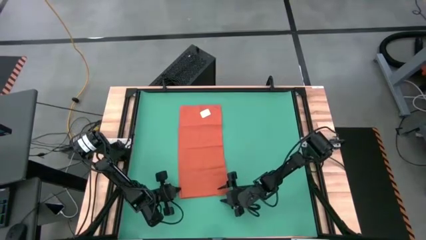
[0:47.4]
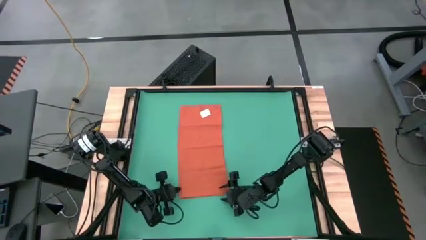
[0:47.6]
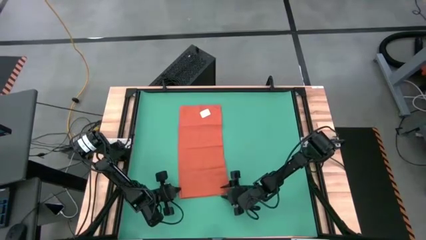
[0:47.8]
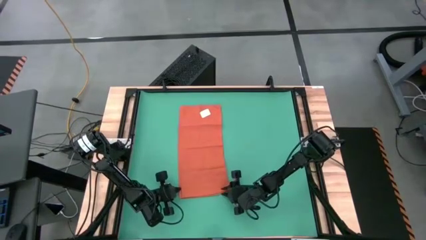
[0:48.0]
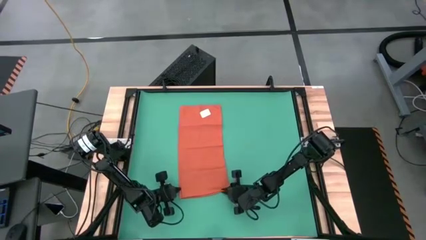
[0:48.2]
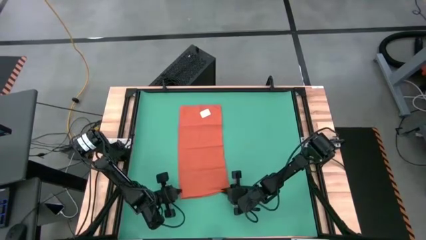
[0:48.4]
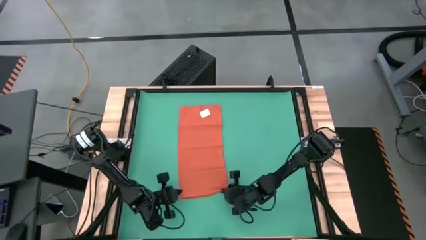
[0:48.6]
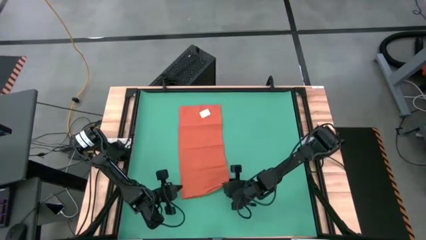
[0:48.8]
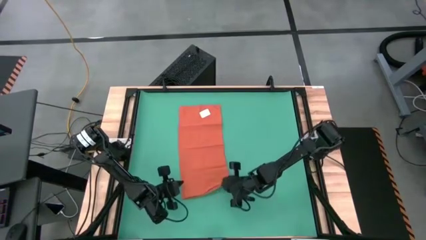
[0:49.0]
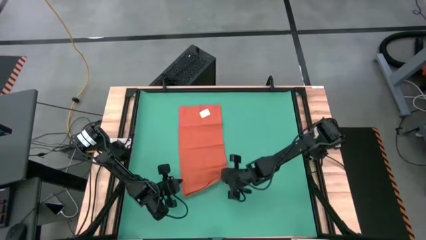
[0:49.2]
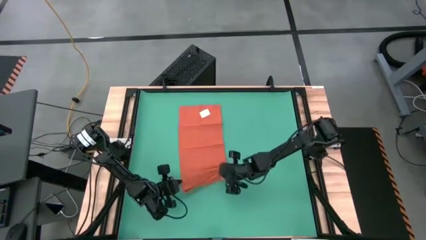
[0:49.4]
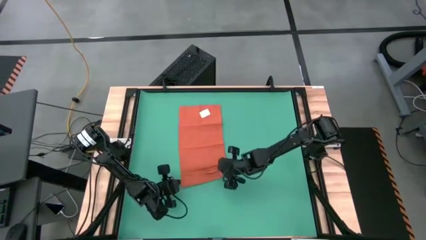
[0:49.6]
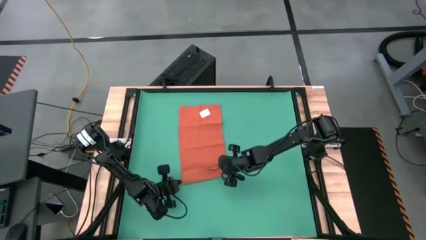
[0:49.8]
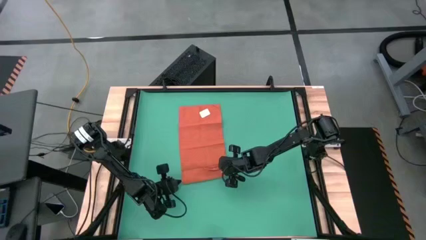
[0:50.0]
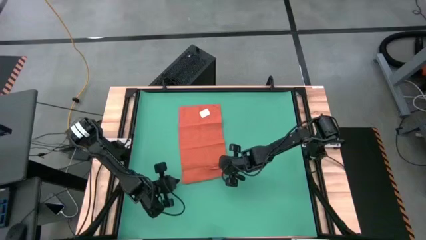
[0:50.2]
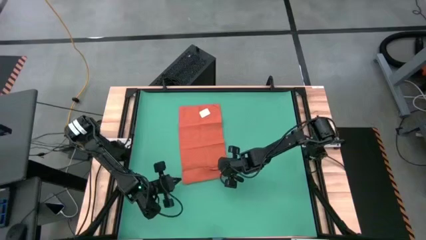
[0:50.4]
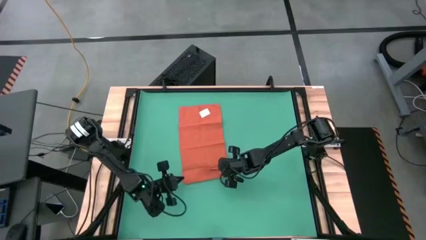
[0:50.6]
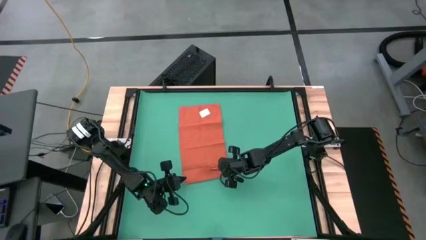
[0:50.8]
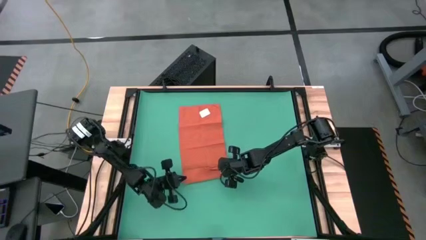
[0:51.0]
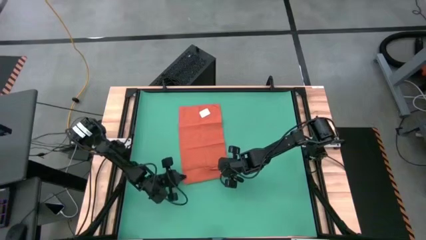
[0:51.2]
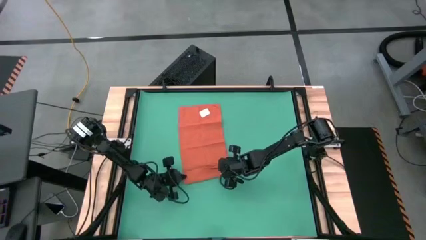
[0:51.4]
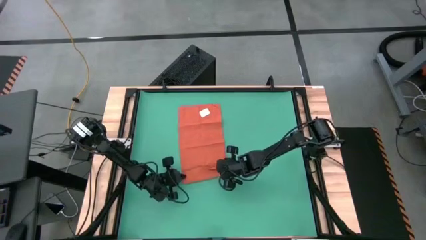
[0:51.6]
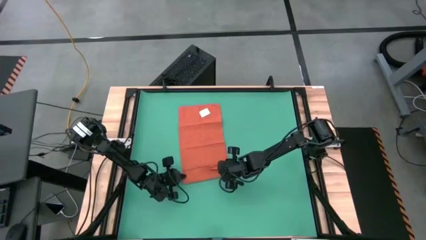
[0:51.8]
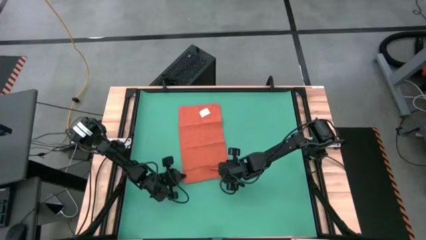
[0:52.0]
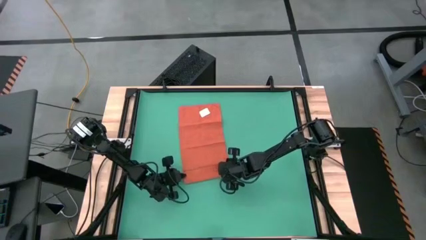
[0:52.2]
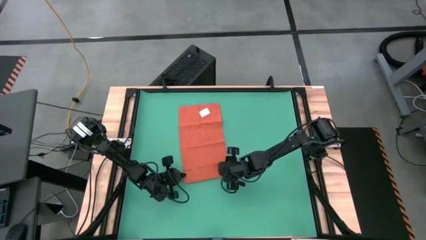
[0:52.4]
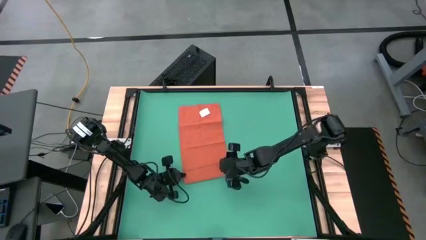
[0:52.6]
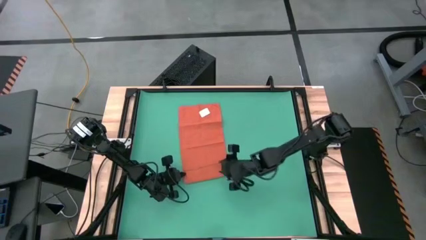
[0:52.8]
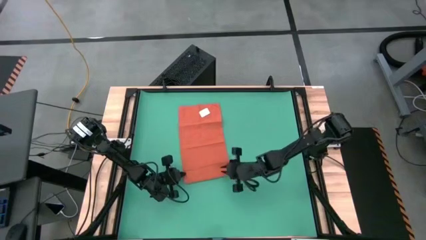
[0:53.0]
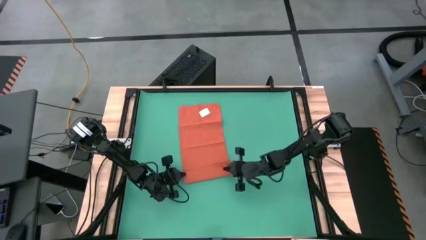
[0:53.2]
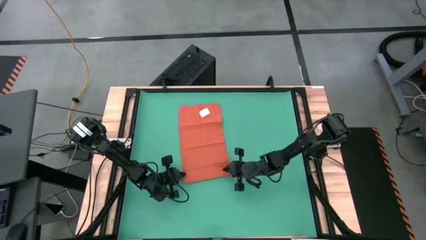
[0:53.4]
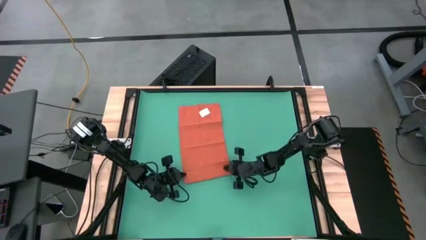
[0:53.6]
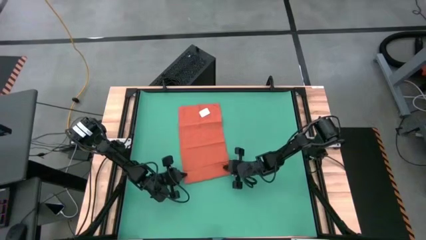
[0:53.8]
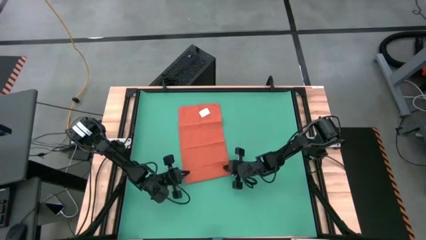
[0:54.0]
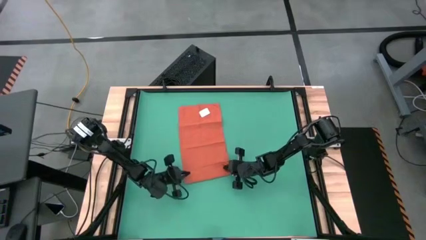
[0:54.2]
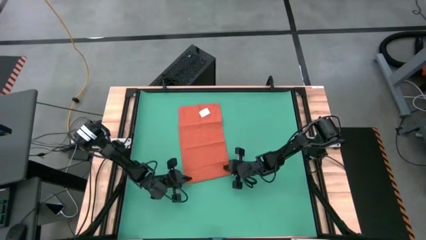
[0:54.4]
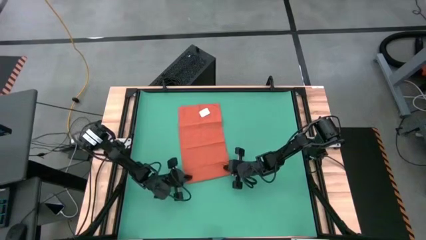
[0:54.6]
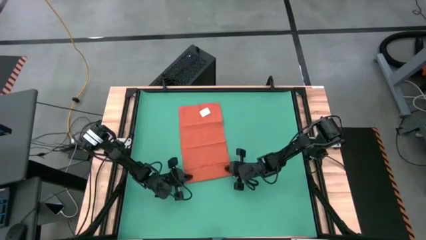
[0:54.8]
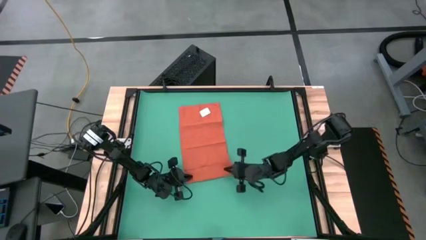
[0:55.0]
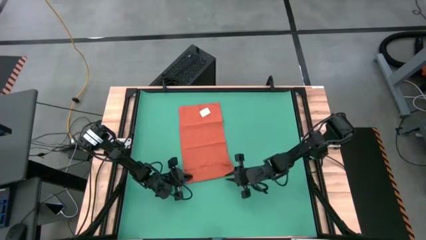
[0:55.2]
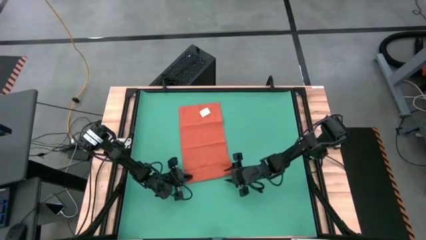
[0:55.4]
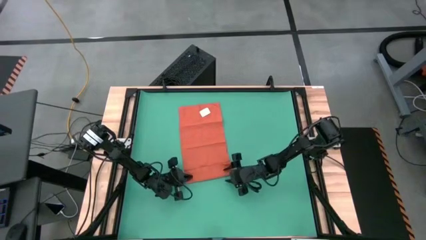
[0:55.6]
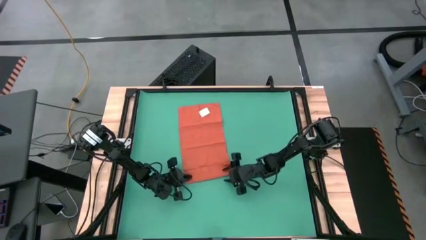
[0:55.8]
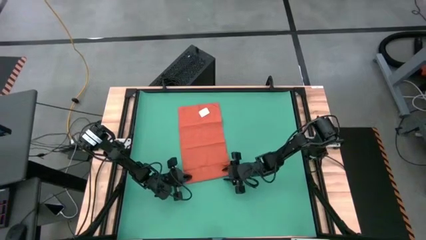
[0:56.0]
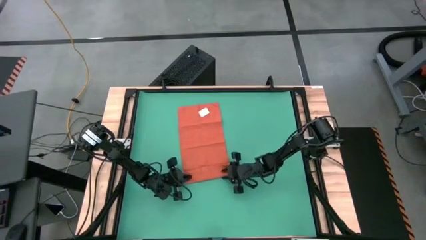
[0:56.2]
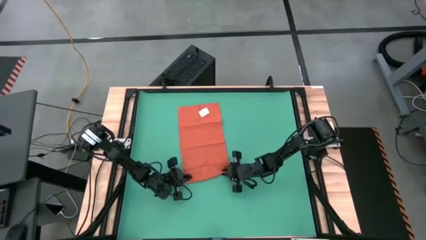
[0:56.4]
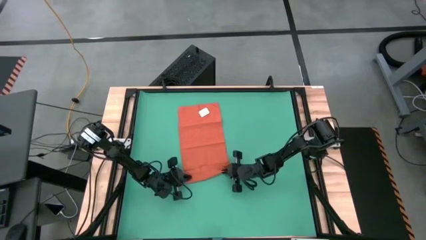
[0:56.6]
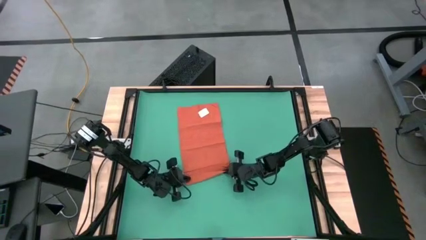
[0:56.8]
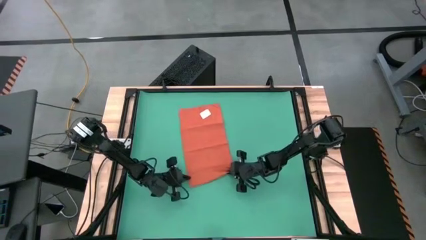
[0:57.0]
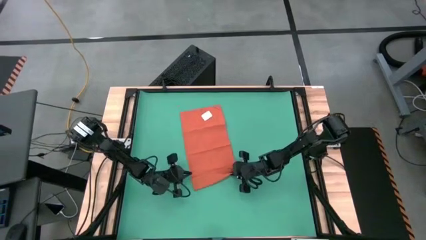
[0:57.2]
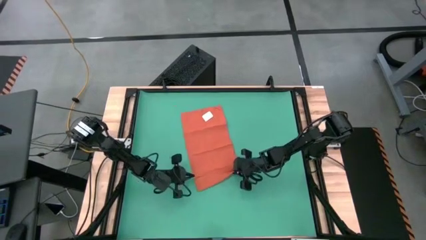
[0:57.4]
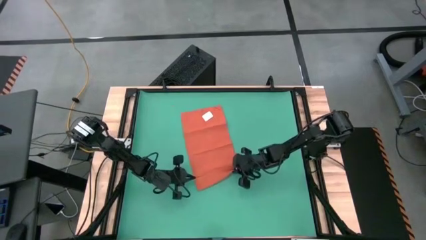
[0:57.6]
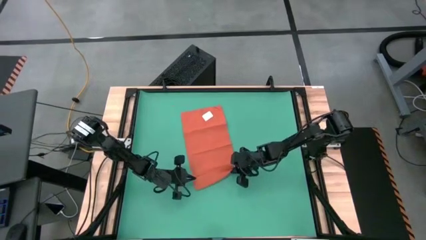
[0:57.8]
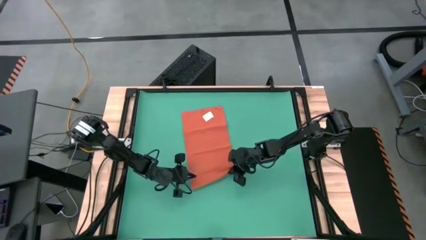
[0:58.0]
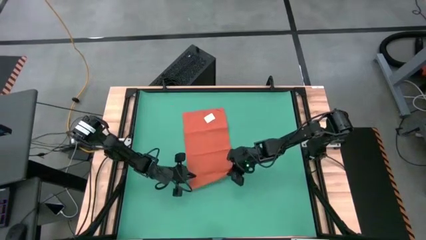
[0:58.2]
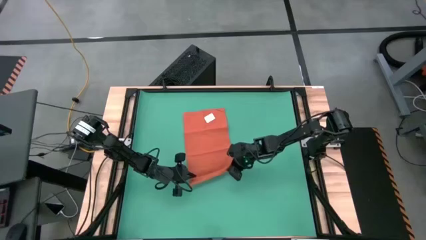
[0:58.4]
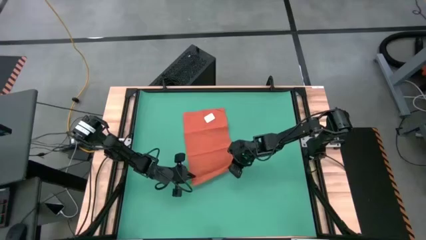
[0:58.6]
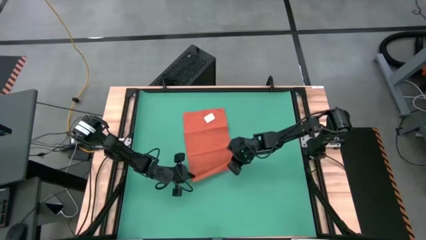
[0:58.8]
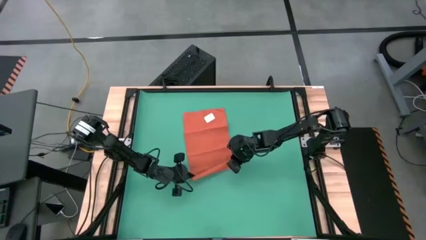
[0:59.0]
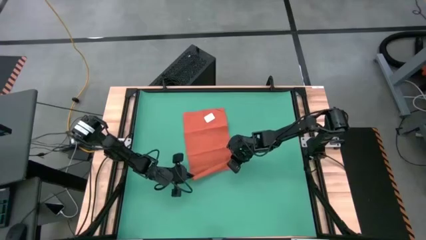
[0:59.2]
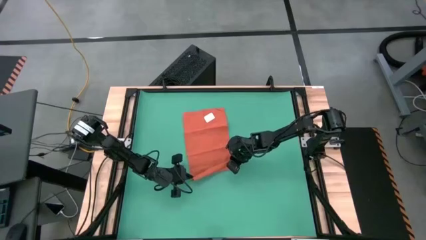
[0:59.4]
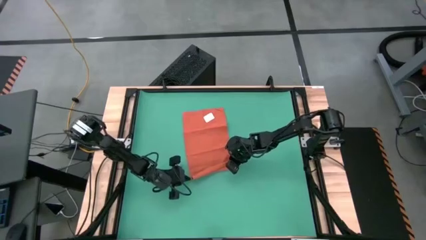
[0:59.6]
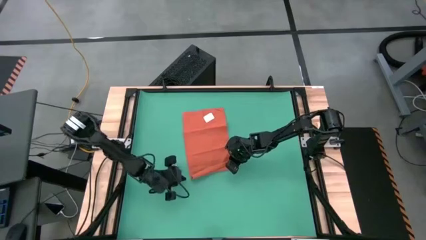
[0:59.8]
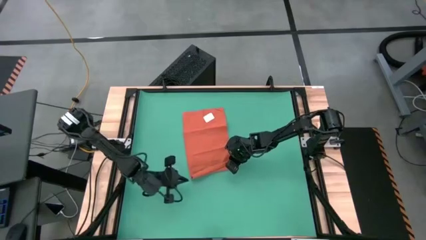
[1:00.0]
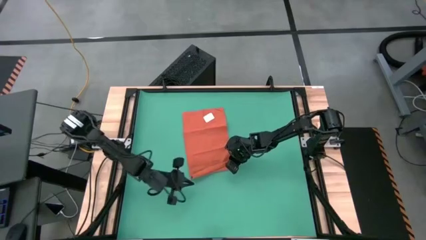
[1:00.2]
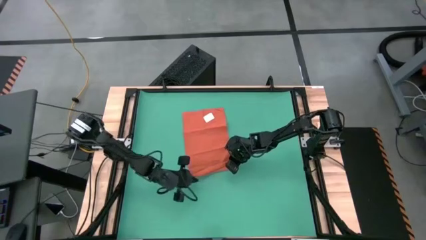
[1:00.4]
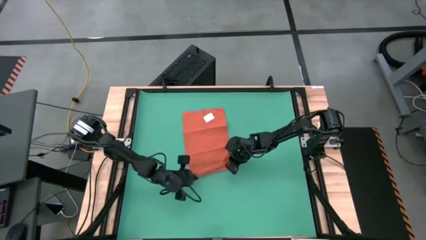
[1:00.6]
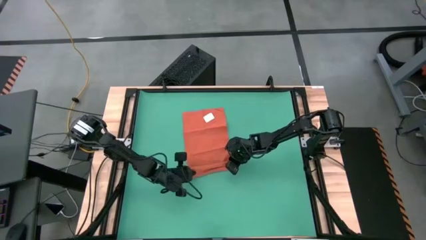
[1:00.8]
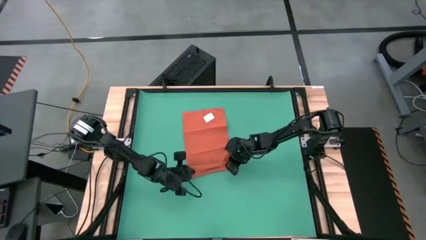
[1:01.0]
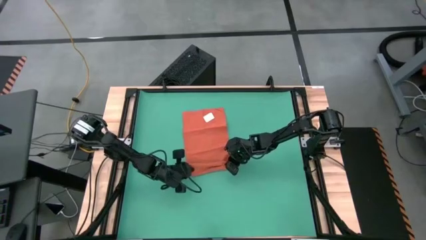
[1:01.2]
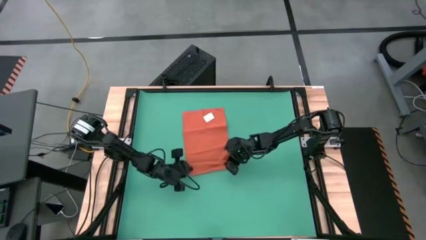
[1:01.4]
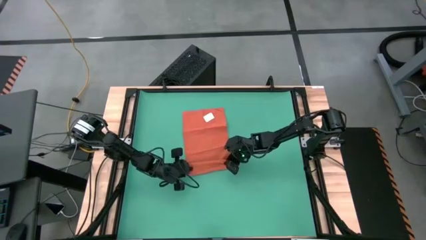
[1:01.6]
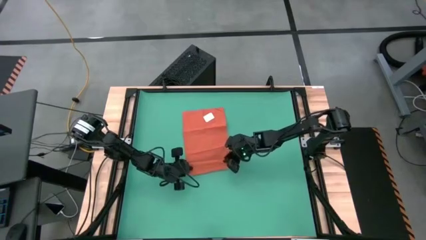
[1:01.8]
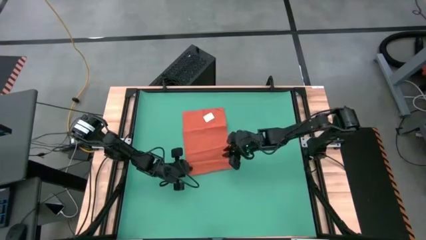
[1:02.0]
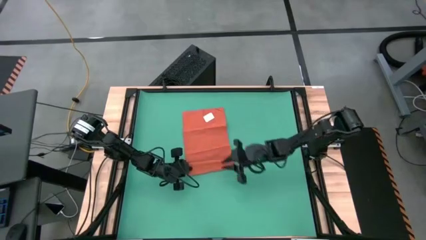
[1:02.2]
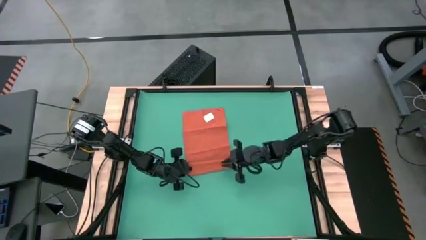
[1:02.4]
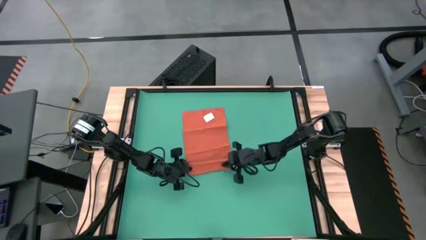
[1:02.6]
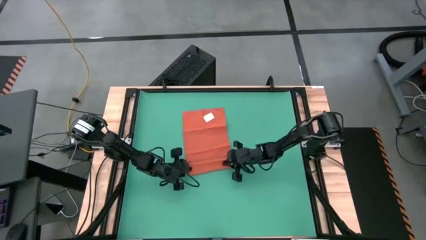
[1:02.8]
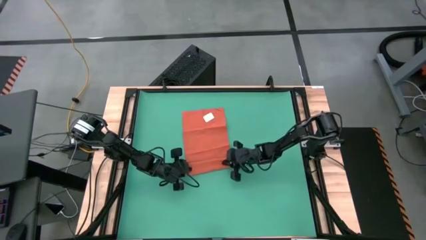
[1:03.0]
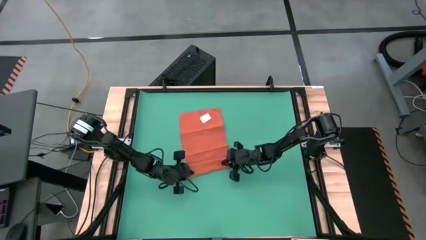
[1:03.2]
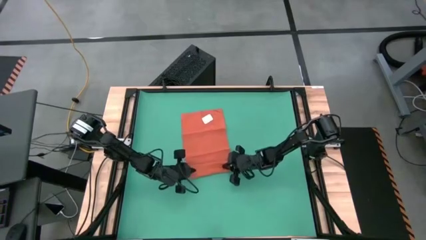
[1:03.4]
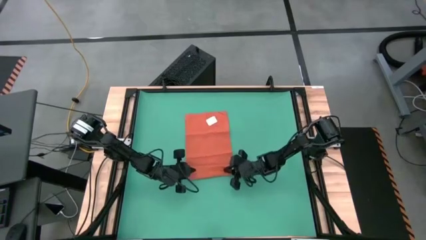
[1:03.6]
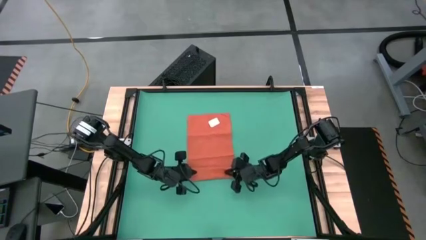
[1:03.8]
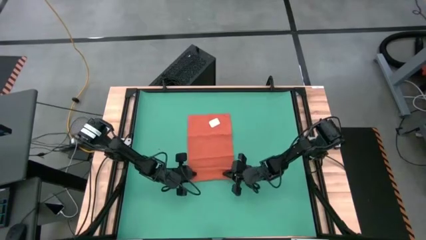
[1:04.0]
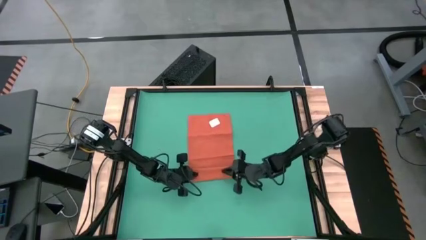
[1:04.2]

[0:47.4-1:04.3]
Task: Roll towel
Roll the orange microfiber towel
